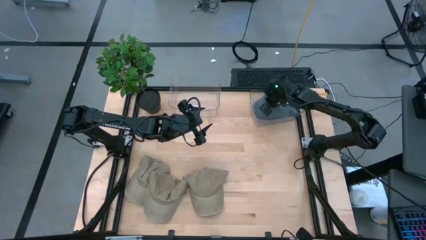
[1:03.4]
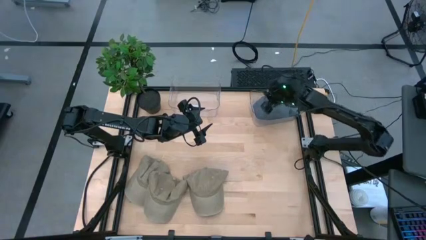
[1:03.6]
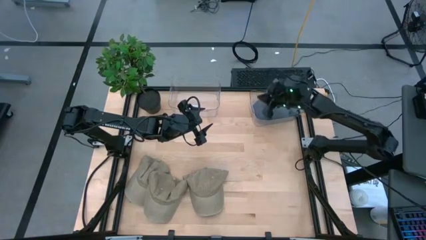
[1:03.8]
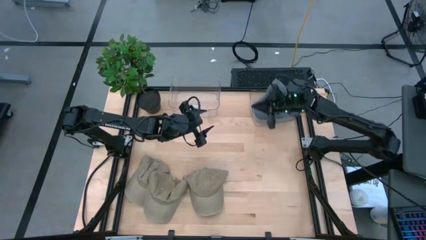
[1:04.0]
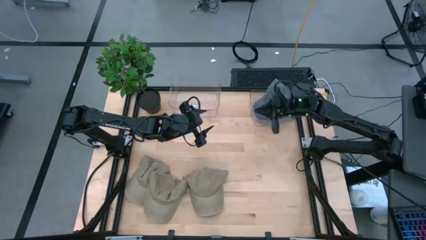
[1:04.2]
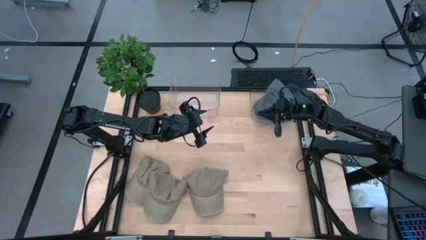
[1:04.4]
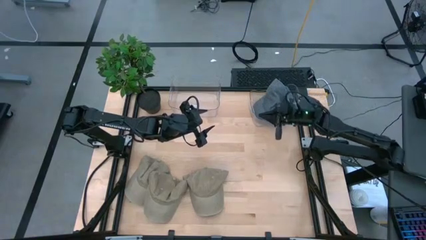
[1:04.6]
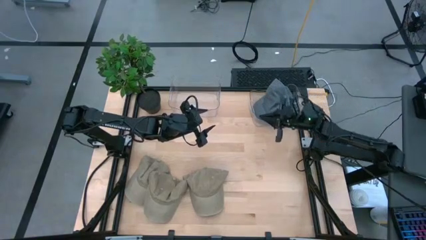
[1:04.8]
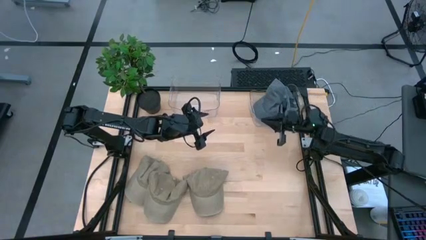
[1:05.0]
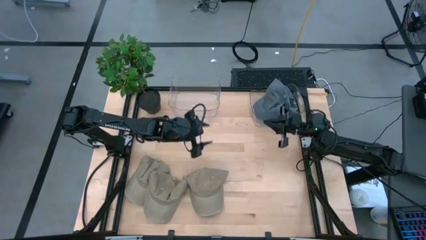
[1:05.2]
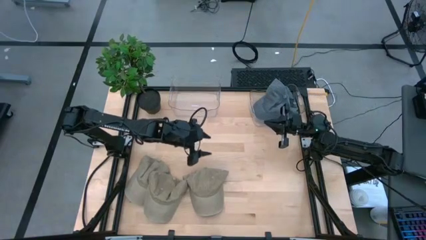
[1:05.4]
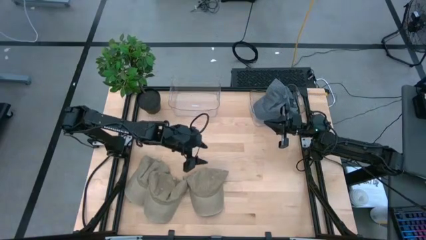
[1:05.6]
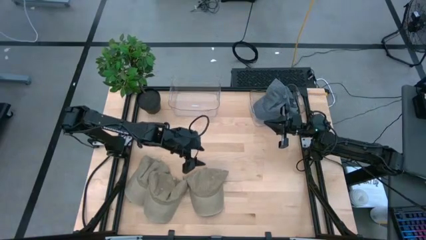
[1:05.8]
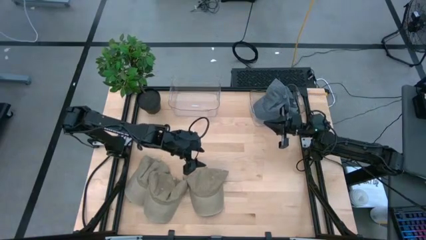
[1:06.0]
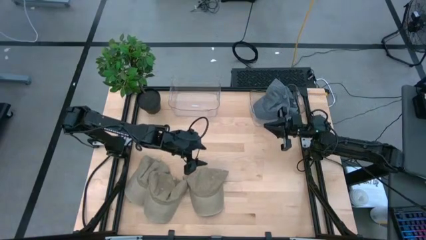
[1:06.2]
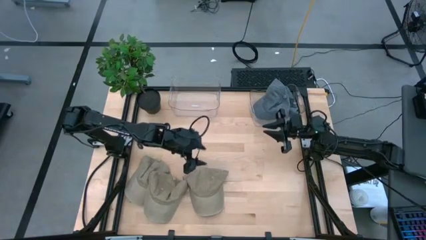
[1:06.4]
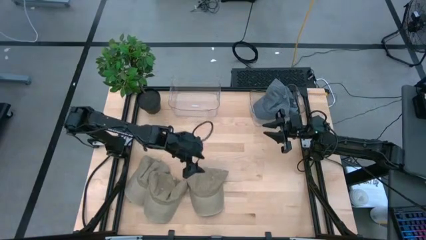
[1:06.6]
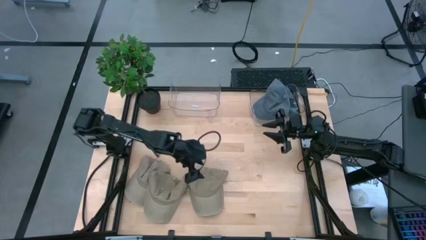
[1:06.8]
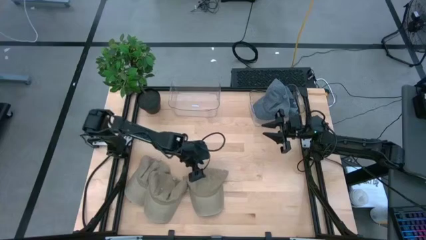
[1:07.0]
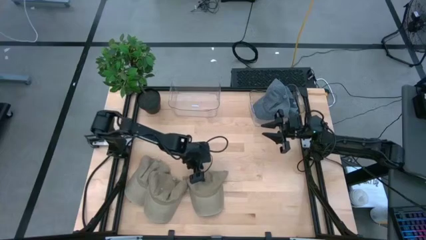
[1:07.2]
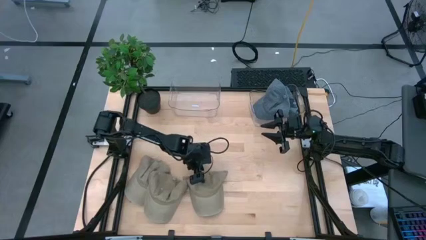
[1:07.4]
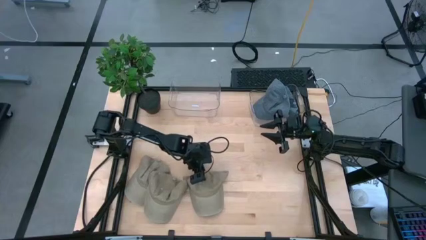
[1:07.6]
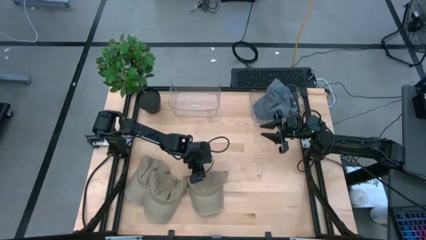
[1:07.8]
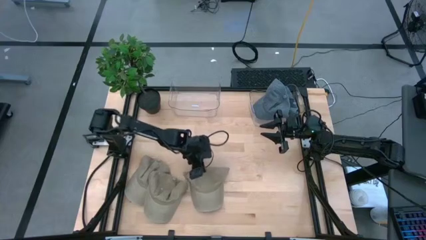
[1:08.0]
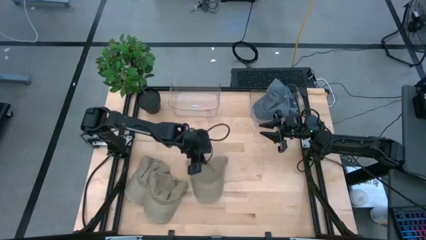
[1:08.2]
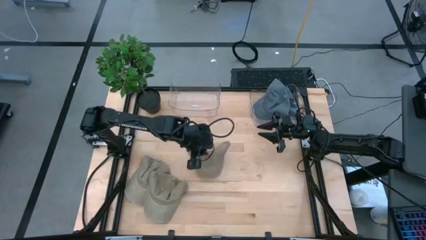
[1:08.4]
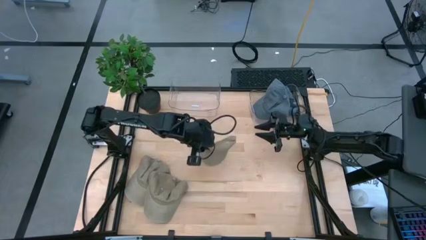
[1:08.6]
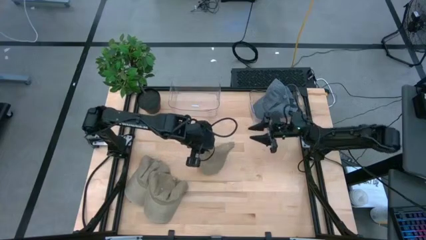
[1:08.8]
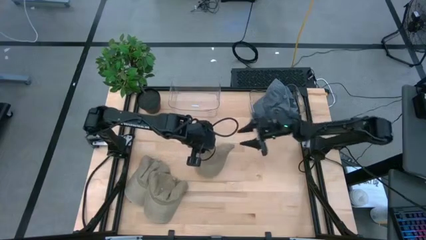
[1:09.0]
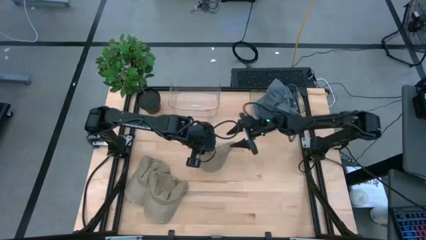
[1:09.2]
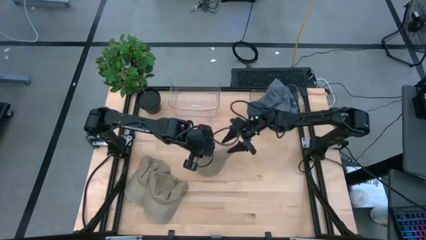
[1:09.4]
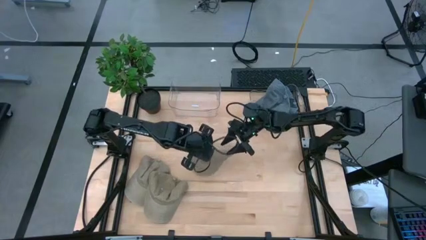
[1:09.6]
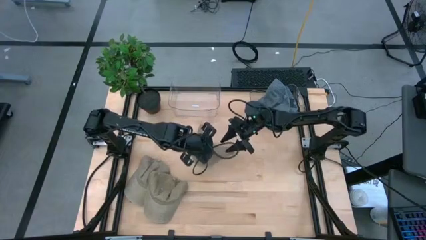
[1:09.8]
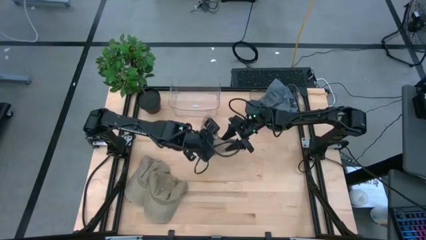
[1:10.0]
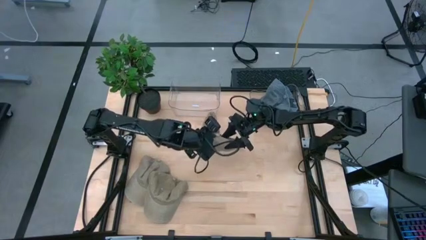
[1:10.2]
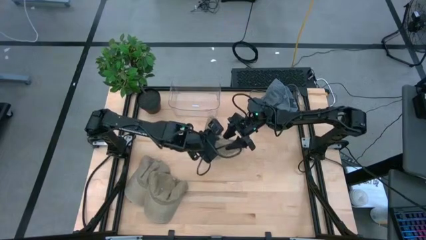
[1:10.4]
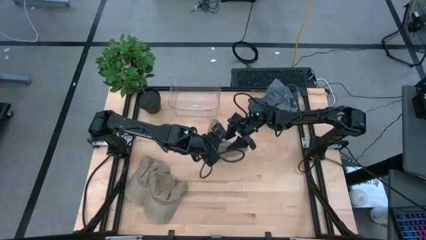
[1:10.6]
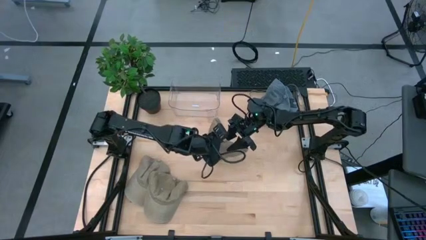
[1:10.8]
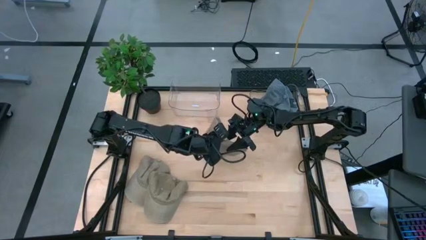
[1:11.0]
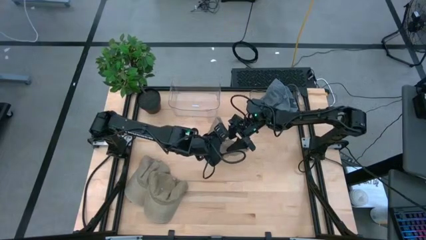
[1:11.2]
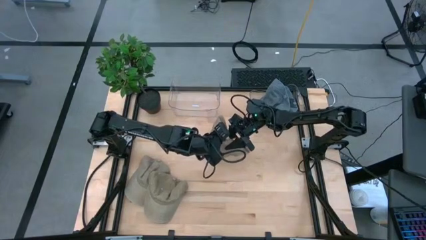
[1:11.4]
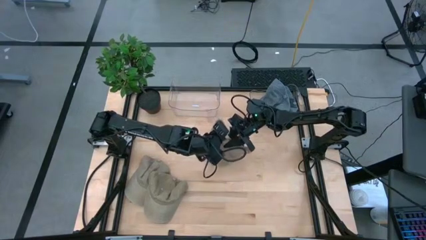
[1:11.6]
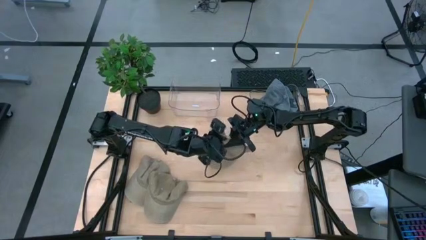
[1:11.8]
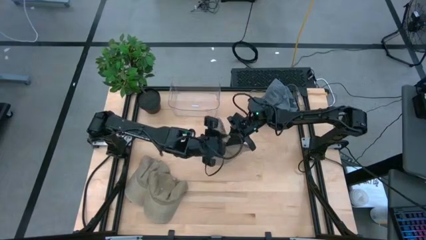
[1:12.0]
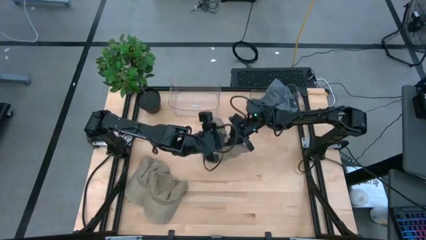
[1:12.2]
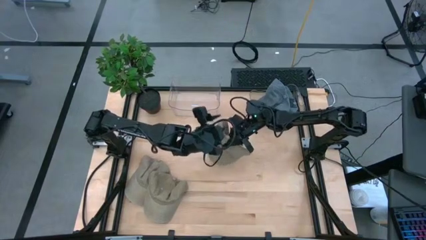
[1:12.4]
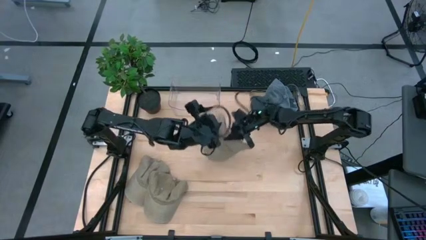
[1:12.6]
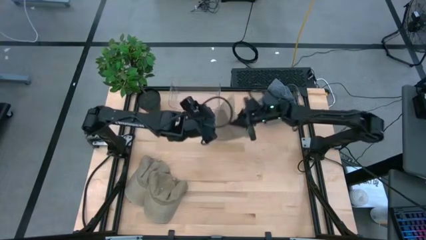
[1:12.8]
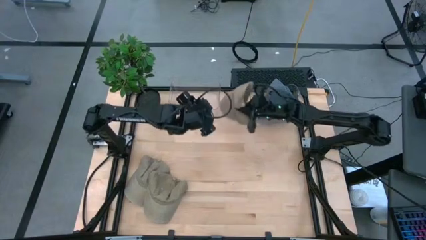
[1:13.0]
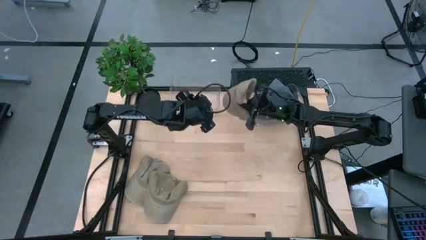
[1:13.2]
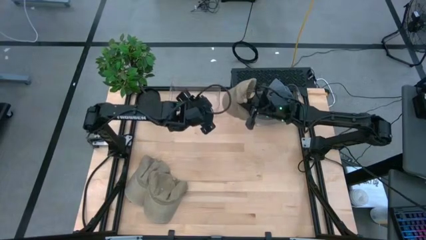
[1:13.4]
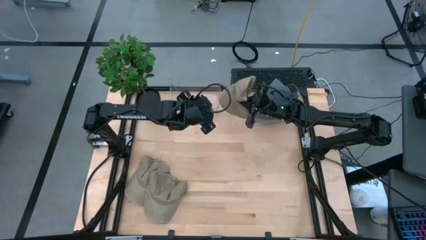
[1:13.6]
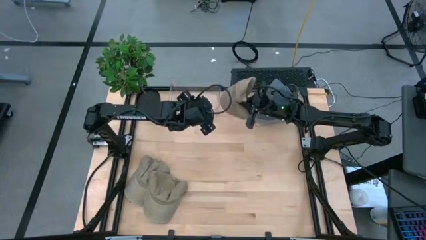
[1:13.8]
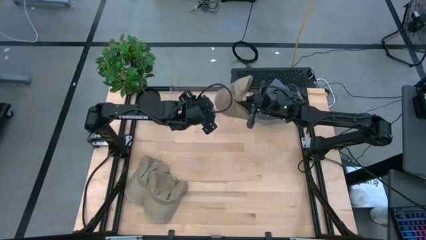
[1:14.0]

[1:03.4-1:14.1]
Task: Pick & Place hat
Put the right brown cap into the left transparent bin
